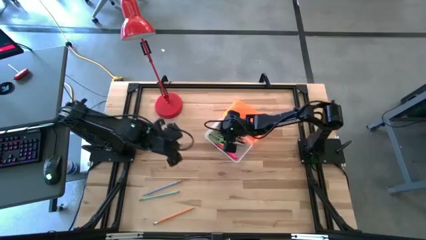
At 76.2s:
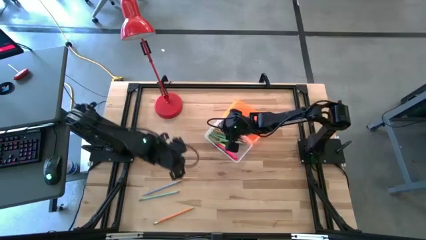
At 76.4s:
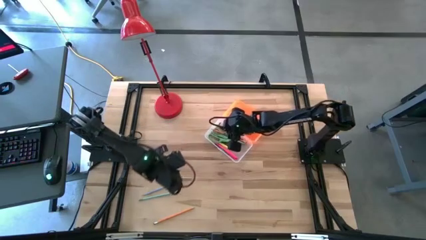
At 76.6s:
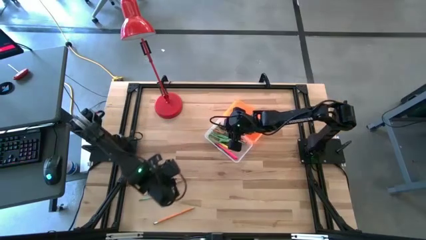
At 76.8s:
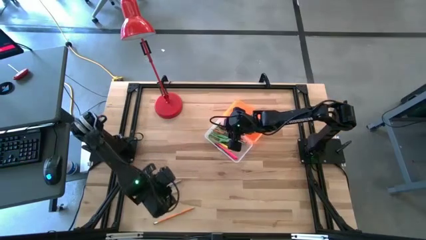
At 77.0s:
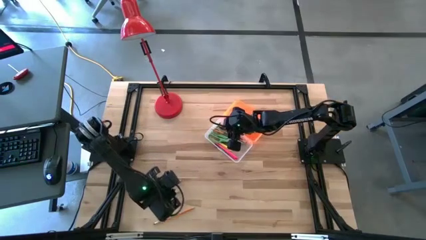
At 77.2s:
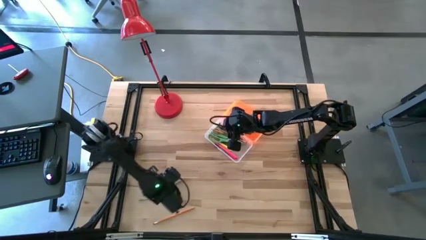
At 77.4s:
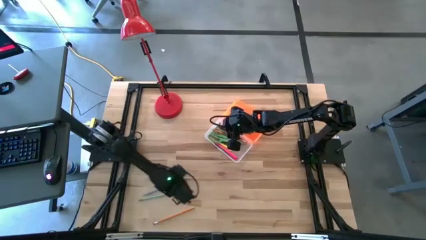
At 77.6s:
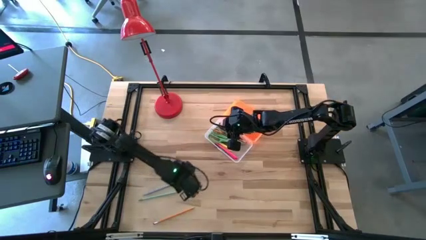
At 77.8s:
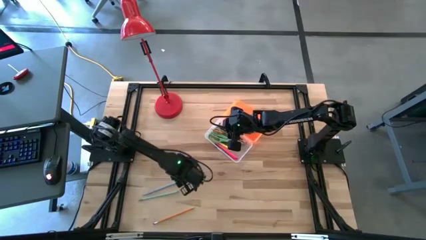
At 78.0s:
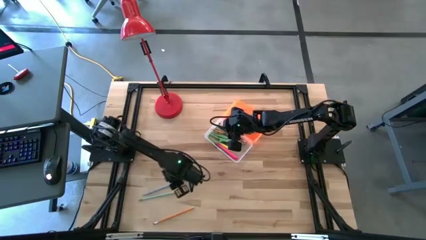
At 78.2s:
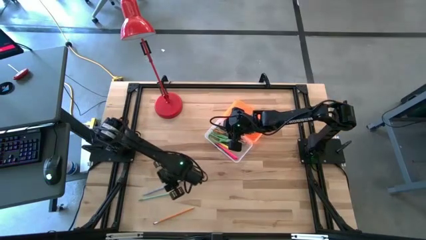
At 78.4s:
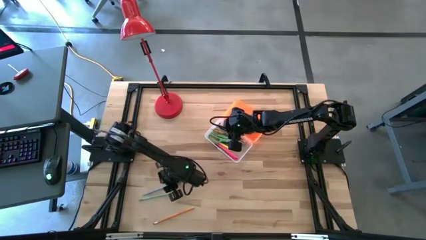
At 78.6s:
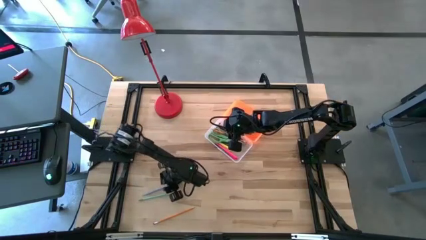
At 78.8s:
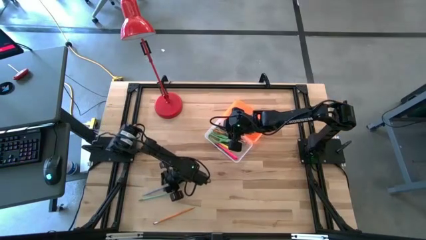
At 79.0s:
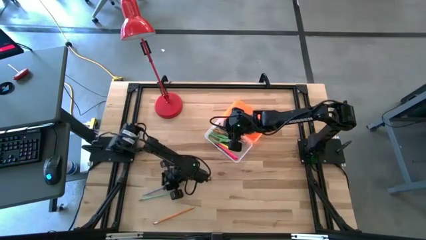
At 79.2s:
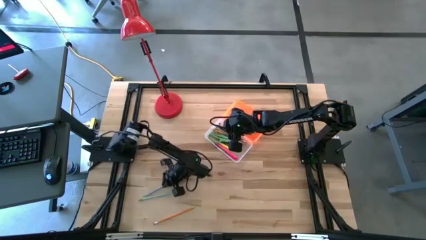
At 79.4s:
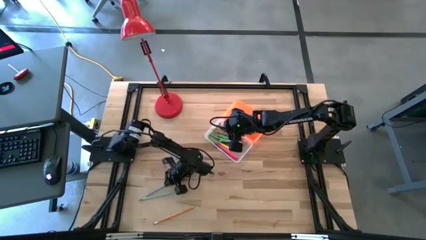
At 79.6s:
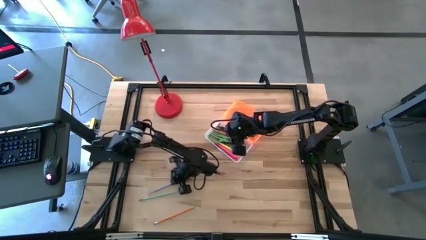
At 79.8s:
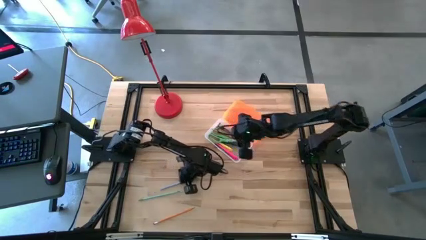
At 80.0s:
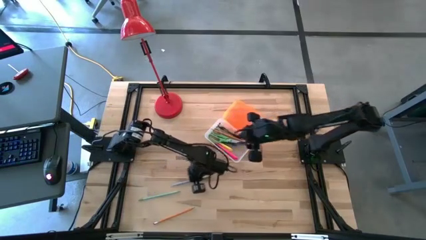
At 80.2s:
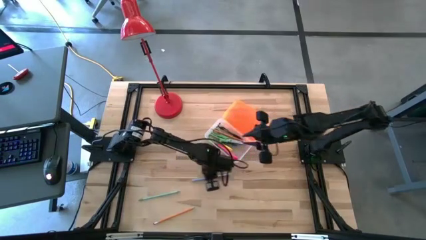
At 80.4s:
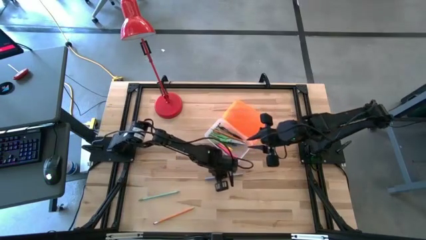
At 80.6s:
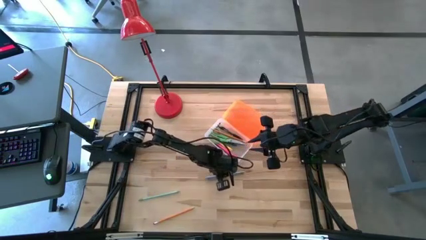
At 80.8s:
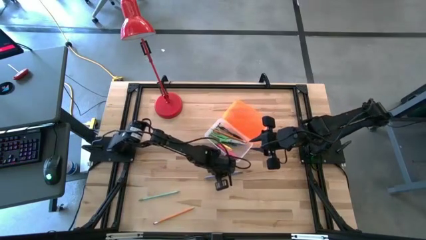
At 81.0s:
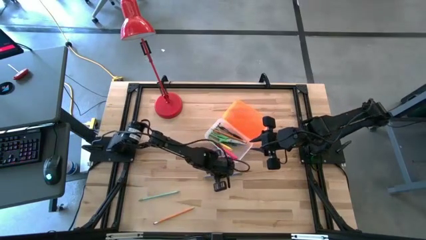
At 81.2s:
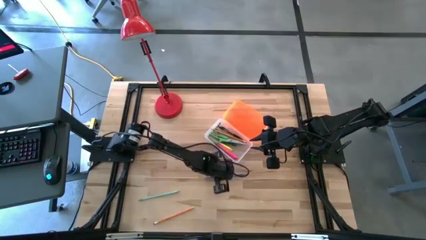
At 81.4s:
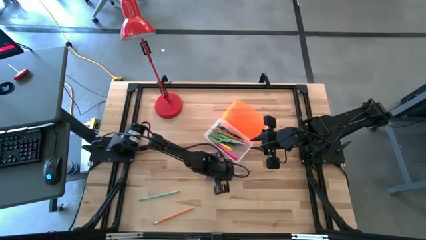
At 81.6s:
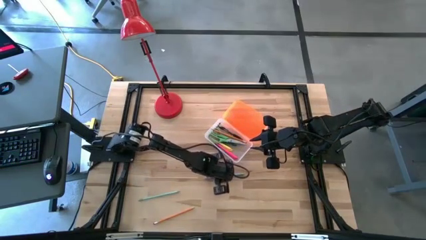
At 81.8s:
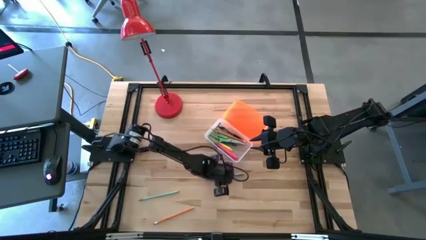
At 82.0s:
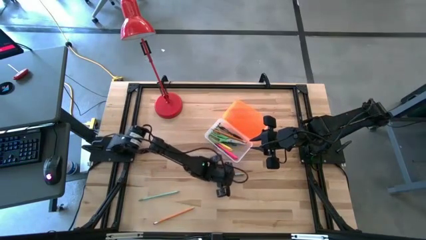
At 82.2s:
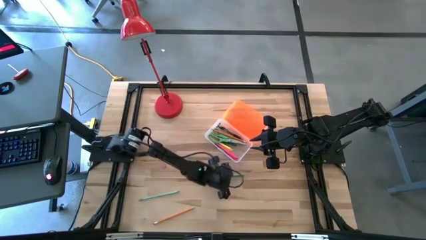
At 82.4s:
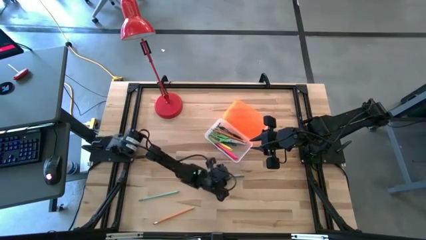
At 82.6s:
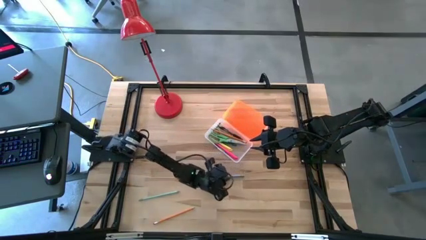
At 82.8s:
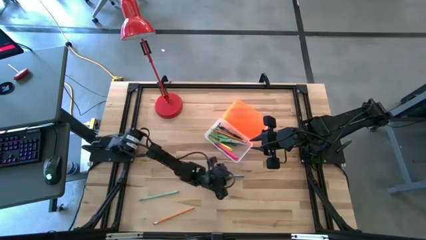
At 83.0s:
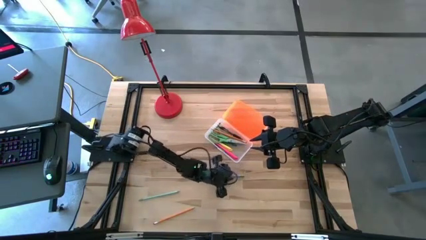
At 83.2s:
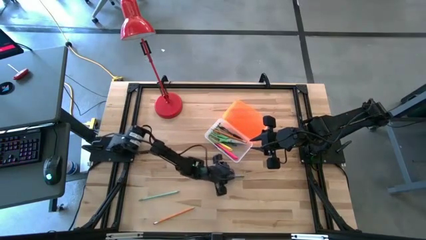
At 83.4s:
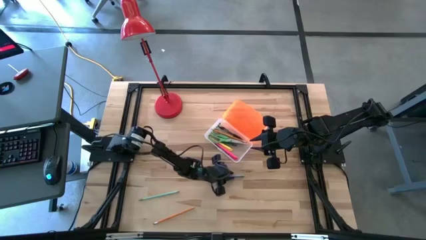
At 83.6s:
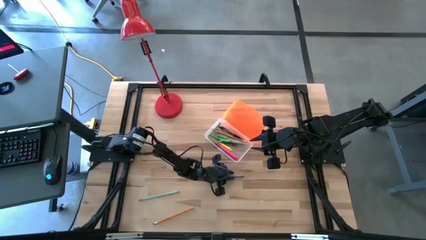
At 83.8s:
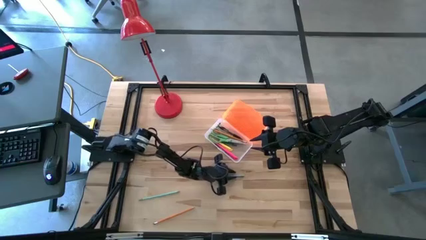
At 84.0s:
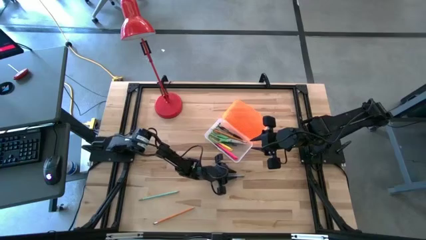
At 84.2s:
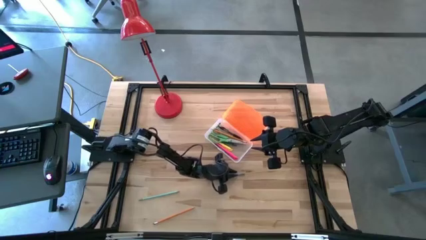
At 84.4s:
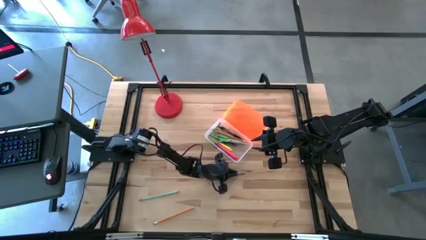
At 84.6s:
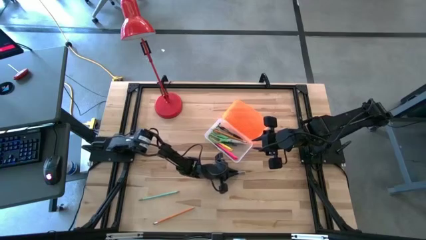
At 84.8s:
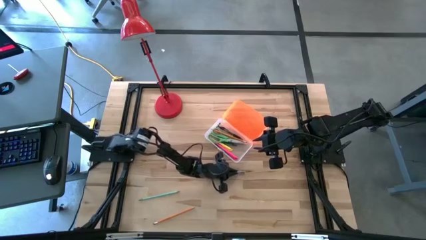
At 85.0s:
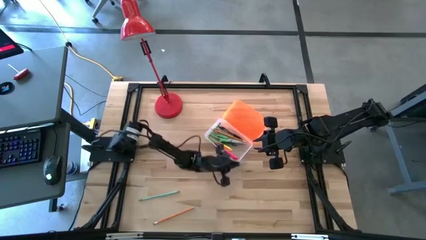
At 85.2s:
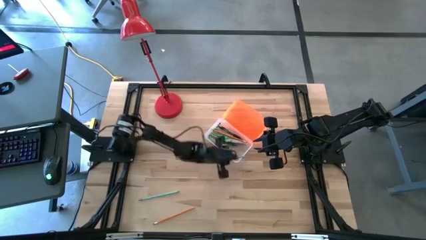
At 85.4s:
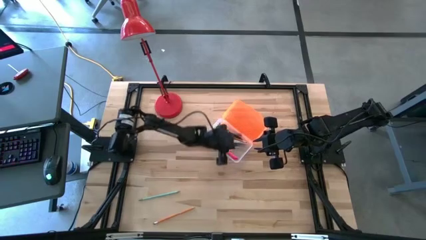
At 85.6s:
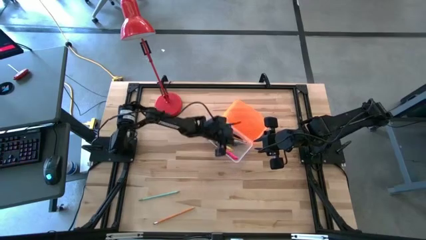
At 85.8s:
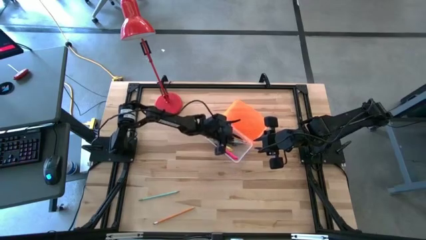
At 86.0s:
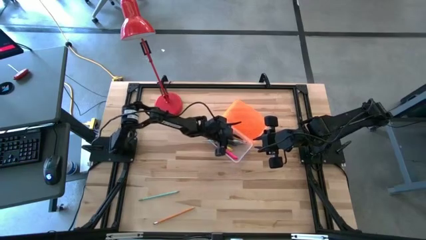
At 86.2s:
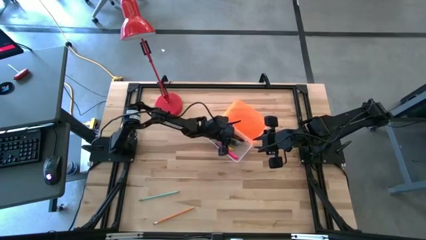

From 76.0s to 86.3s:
Task: Pick & place school supplies into a supply box
Put the top light blue pencil into the supply box

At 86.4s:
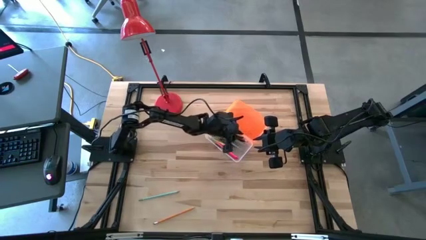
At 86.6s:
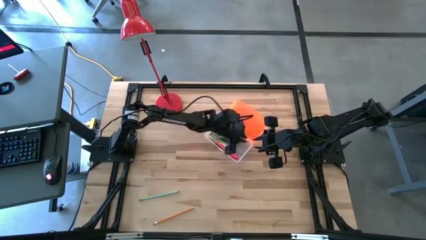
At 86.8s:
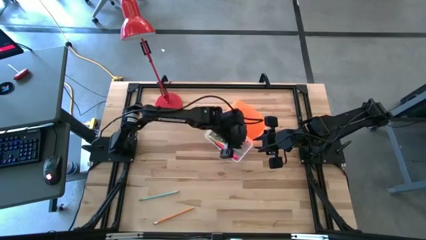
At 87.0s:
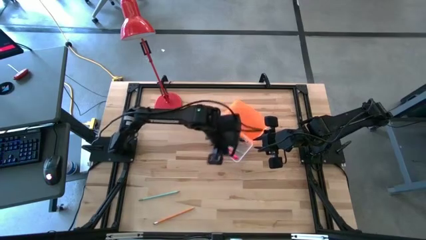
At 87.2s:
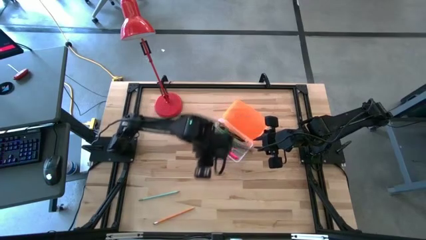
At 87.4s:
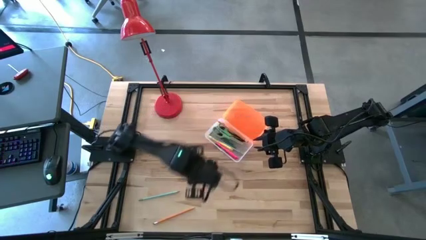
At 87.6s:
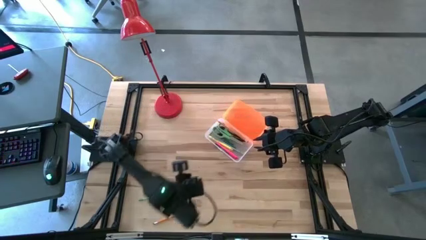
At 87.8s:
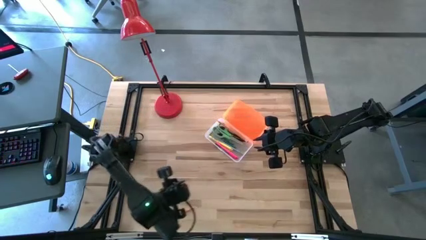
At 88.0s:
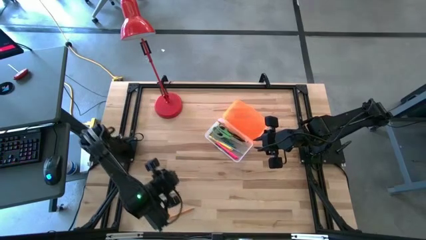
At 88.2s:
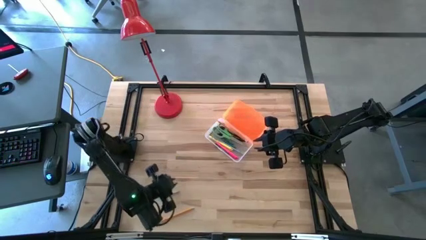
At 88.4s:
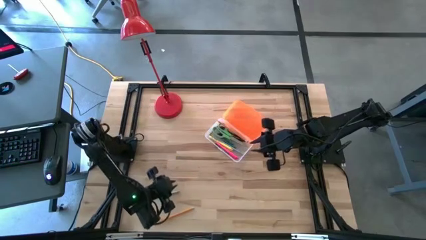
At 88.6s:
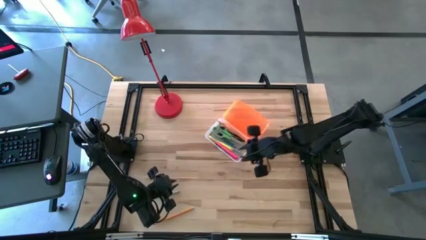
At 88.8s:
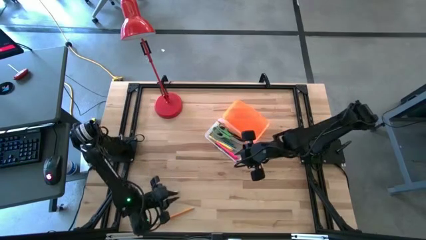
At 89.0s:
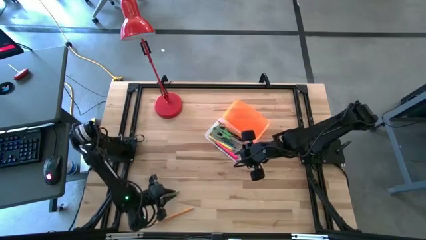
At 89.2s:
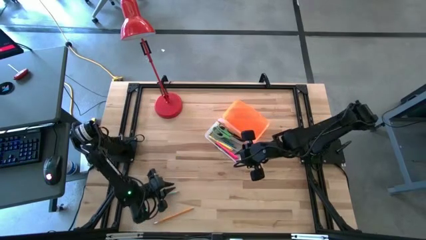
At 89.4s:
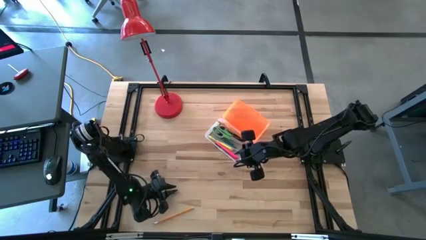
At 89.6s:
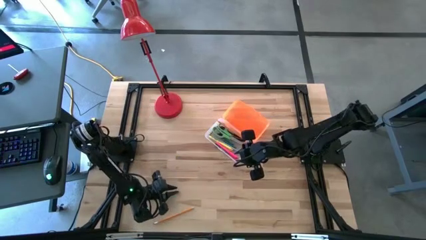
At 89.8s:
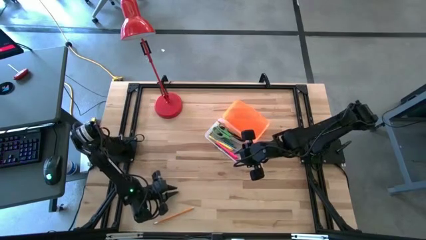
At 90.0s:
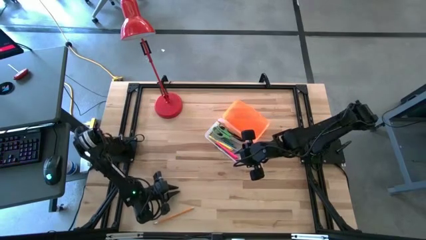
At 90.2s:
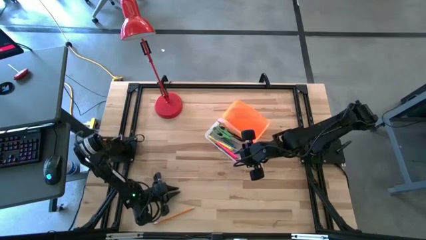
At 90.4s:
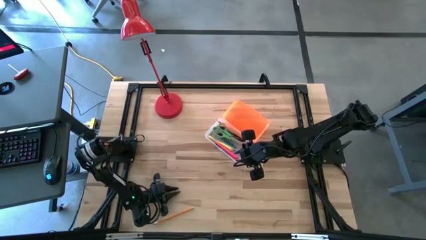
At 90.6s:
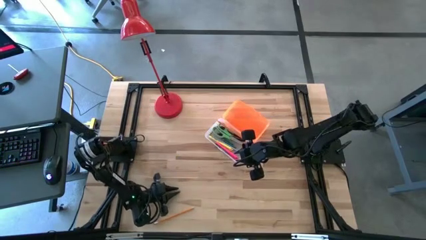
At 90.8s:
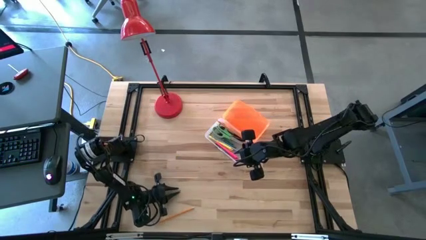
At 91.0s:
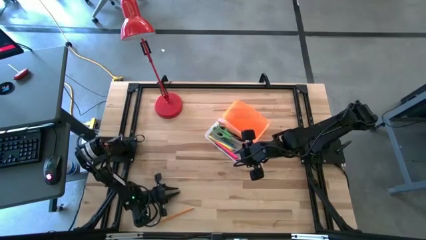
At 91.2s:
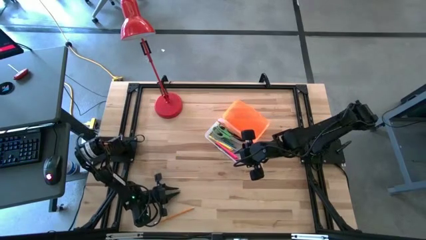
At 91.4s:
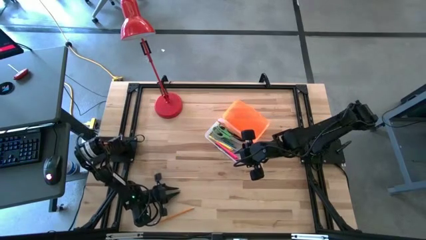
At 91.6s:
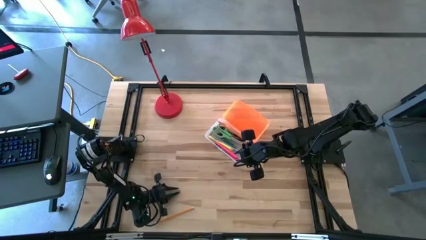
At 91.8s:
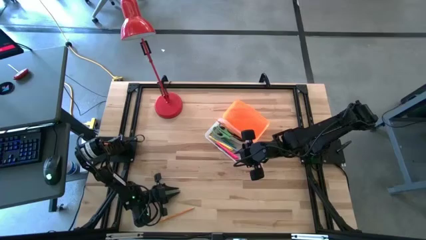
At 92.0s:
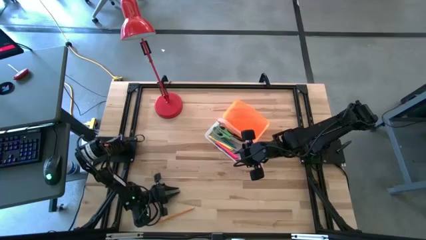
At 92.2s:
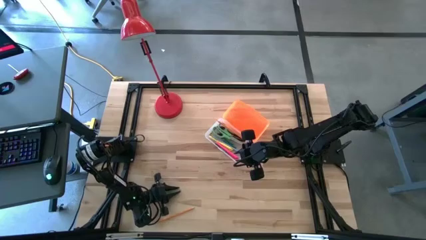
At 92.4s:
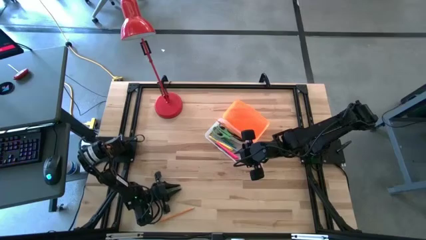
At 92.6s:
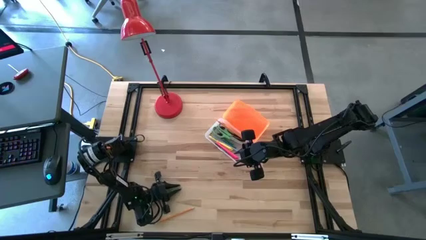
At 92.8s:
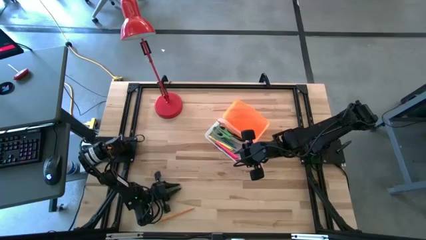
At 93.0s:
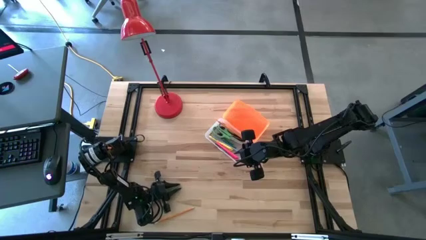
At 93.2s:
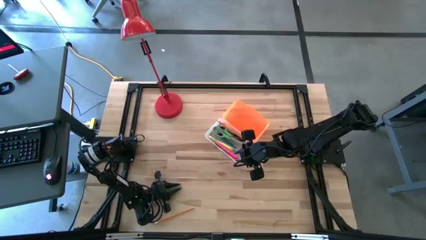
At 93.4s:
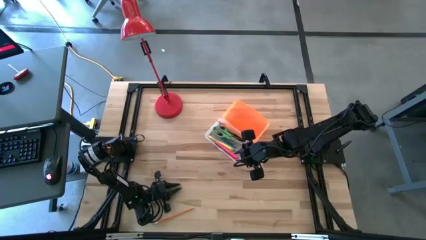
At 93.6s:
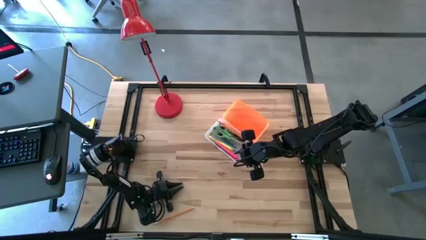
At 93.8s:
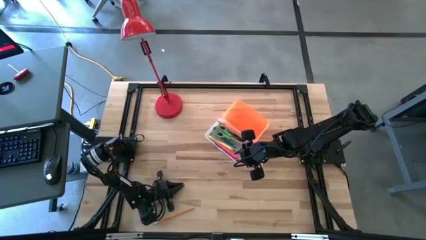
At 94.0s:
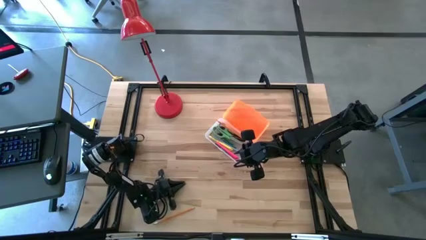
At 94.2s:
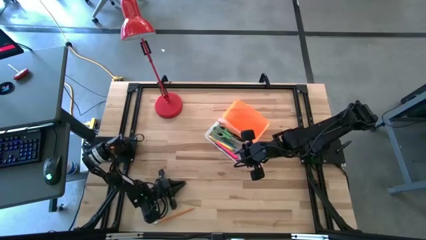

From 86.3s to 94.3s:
Put the light blue pencil into the supply box
